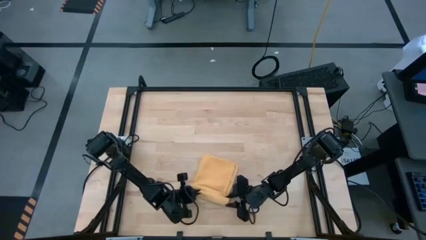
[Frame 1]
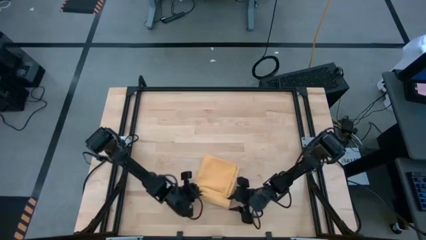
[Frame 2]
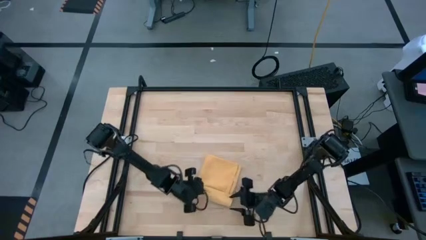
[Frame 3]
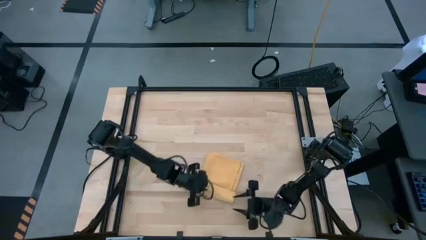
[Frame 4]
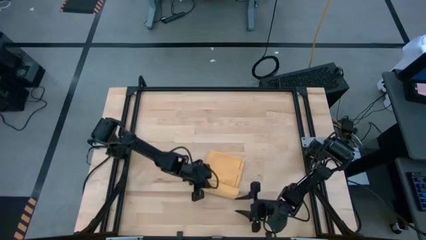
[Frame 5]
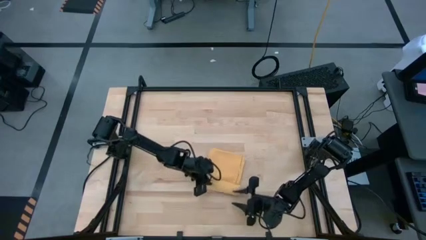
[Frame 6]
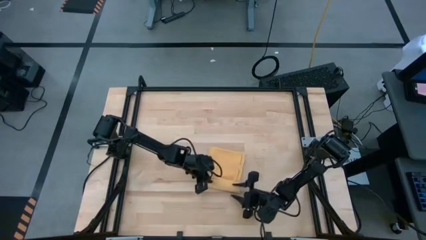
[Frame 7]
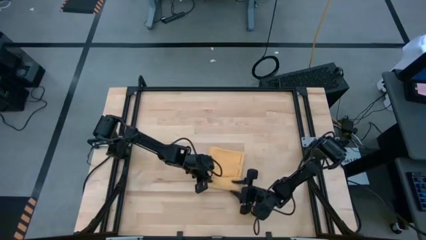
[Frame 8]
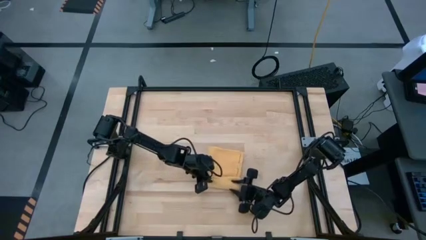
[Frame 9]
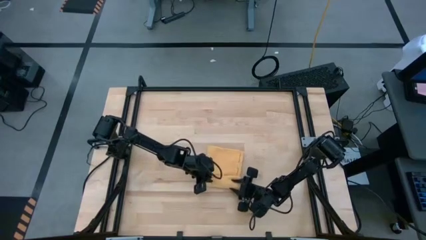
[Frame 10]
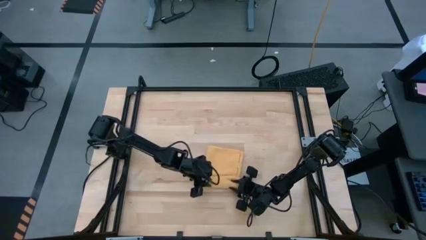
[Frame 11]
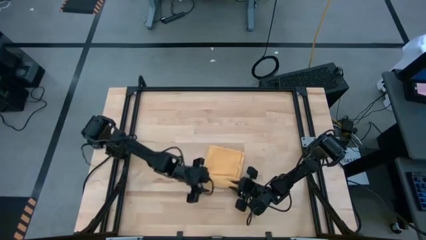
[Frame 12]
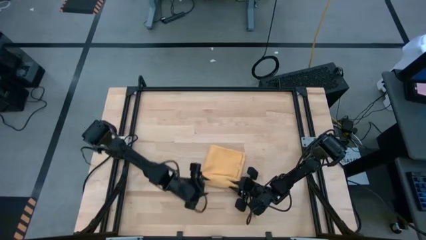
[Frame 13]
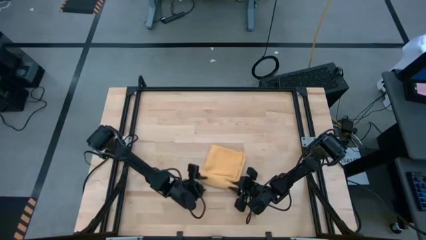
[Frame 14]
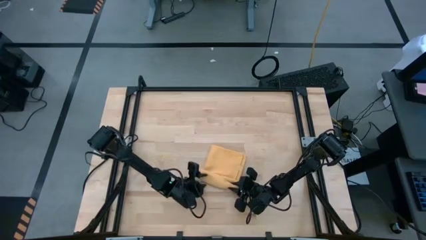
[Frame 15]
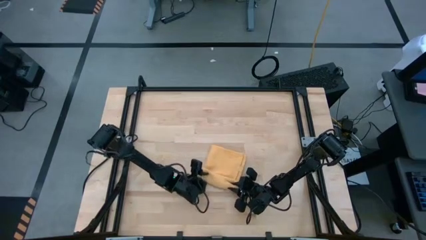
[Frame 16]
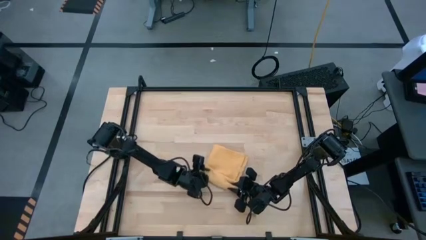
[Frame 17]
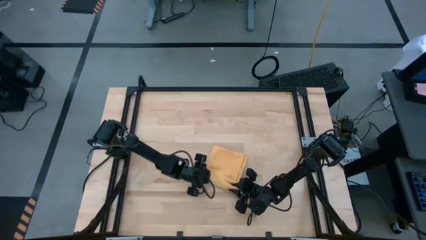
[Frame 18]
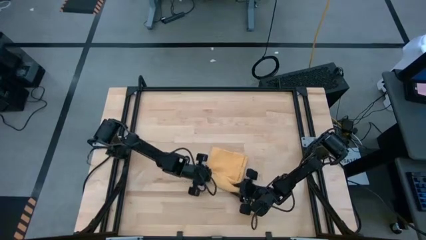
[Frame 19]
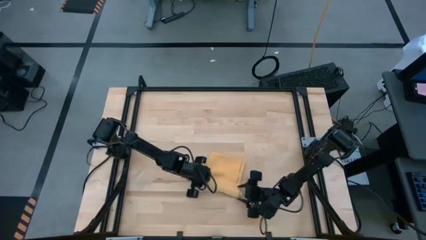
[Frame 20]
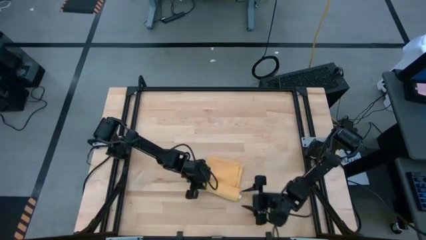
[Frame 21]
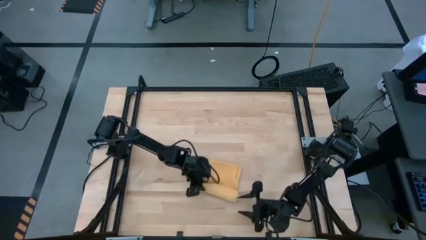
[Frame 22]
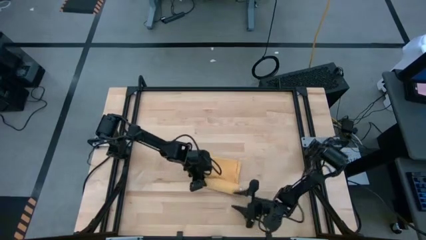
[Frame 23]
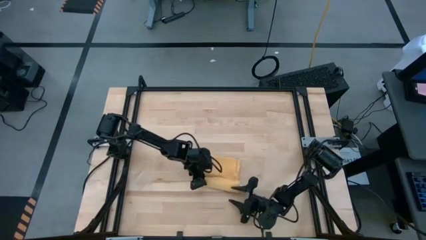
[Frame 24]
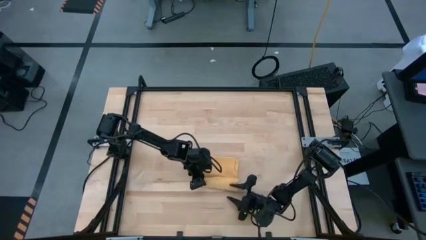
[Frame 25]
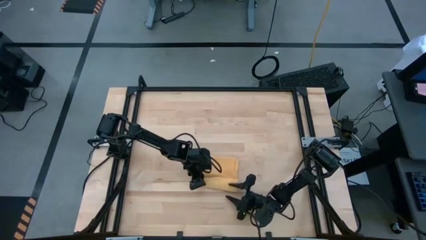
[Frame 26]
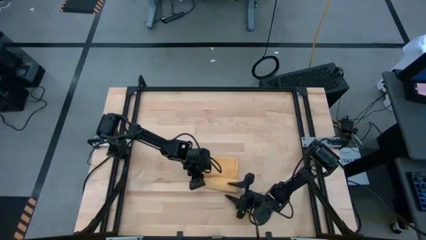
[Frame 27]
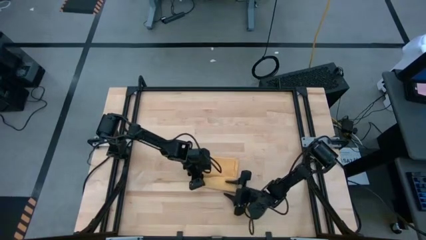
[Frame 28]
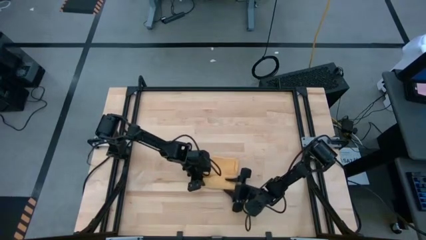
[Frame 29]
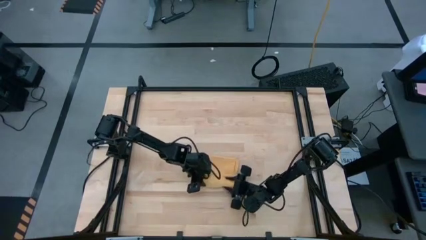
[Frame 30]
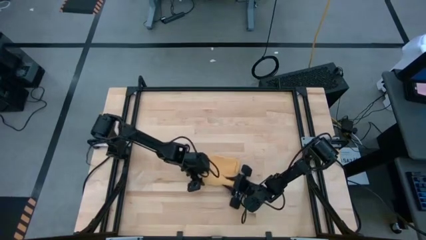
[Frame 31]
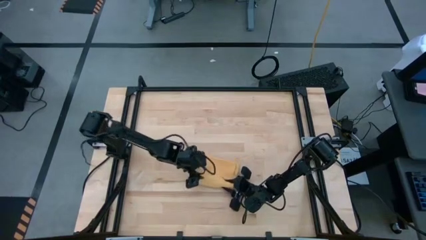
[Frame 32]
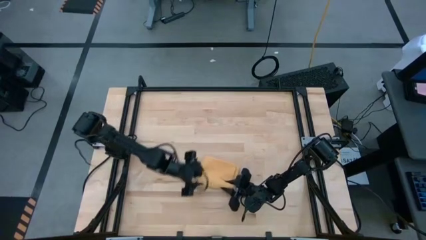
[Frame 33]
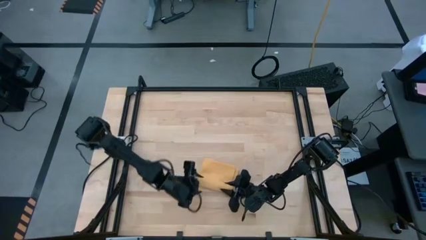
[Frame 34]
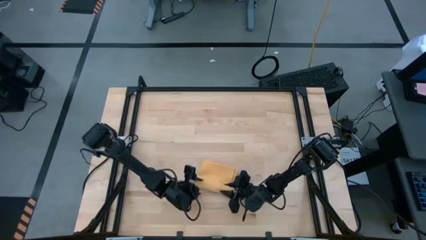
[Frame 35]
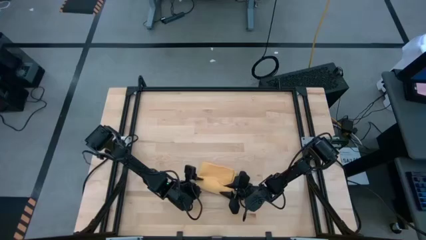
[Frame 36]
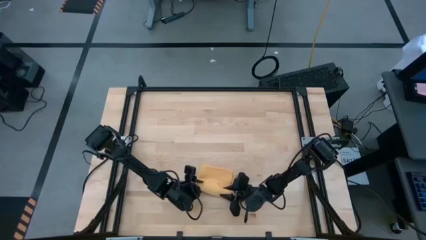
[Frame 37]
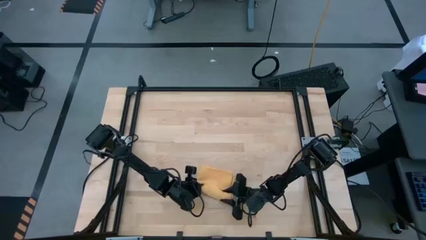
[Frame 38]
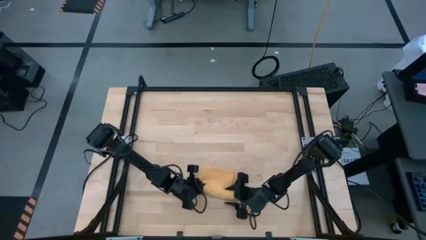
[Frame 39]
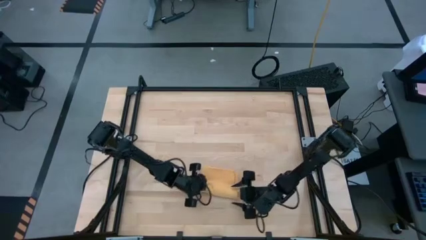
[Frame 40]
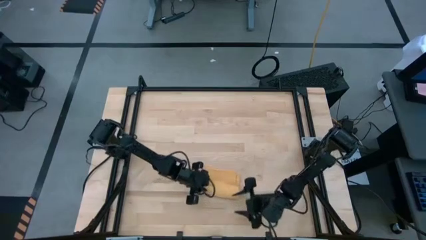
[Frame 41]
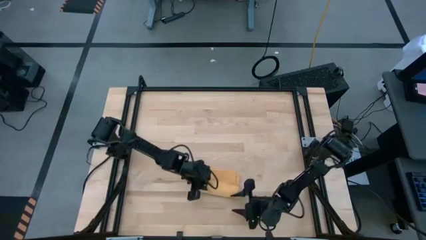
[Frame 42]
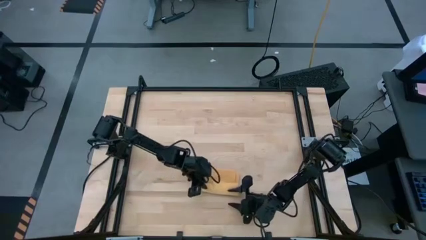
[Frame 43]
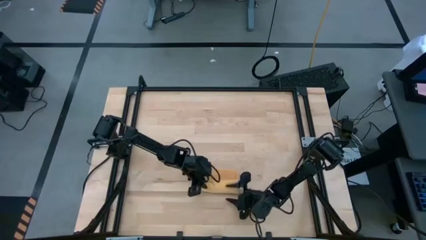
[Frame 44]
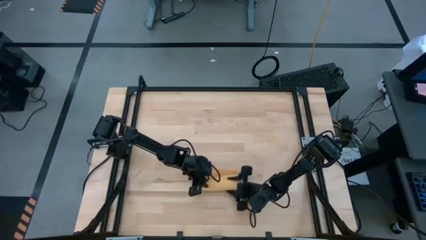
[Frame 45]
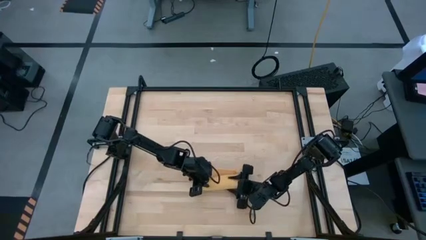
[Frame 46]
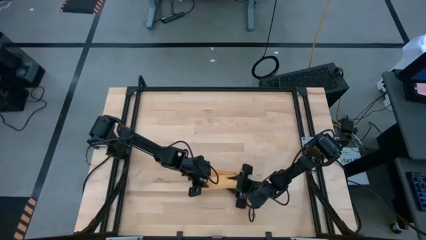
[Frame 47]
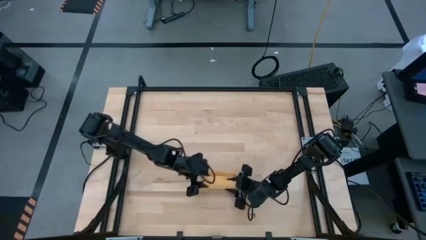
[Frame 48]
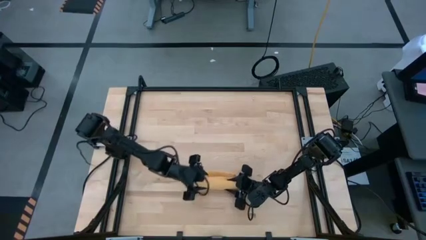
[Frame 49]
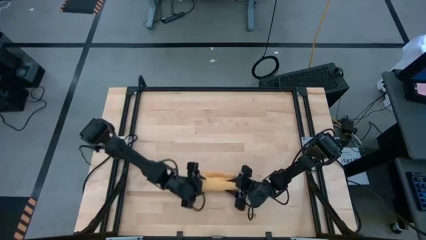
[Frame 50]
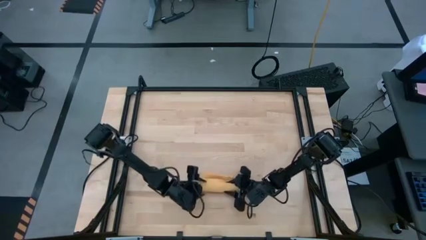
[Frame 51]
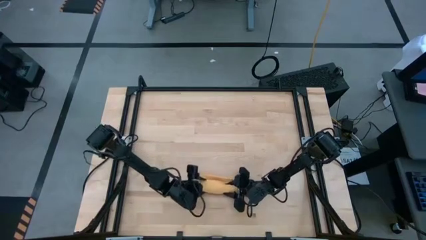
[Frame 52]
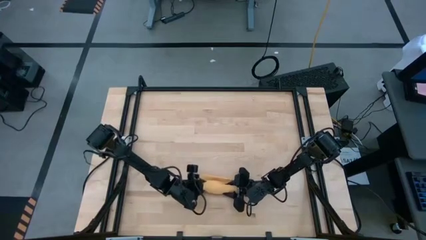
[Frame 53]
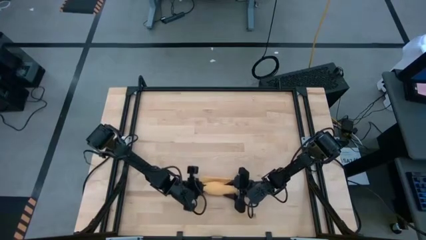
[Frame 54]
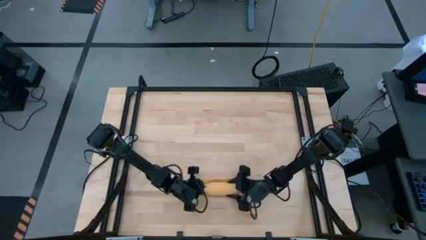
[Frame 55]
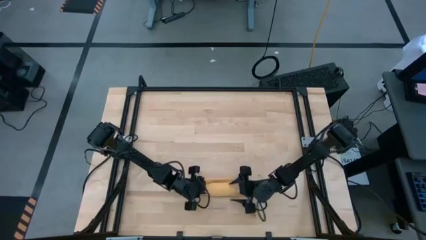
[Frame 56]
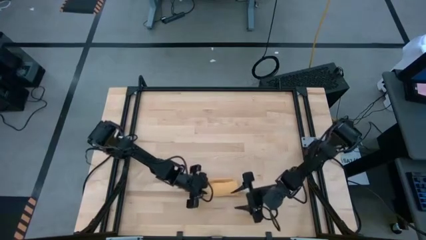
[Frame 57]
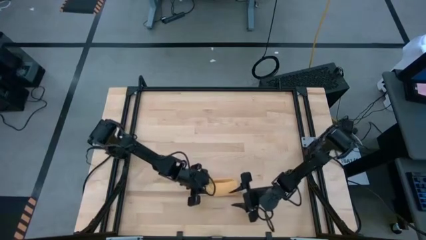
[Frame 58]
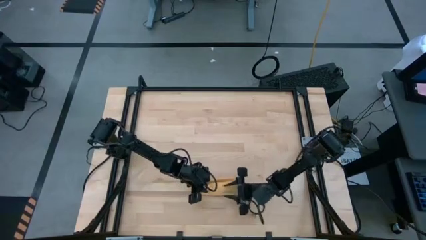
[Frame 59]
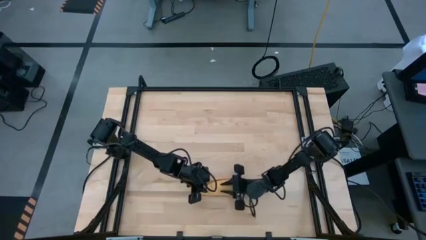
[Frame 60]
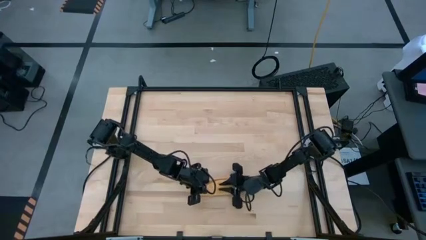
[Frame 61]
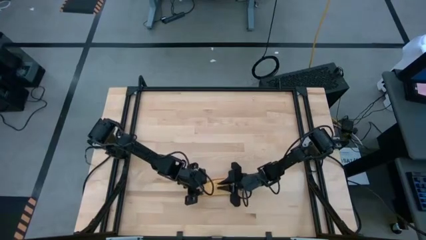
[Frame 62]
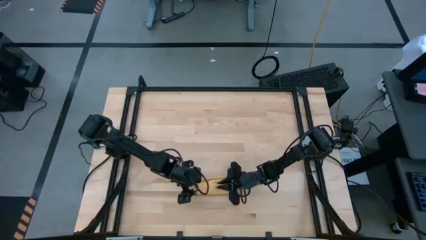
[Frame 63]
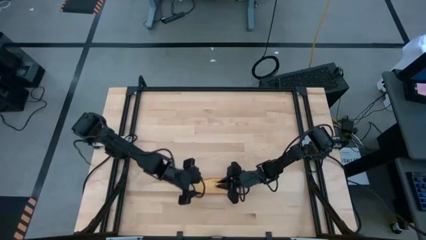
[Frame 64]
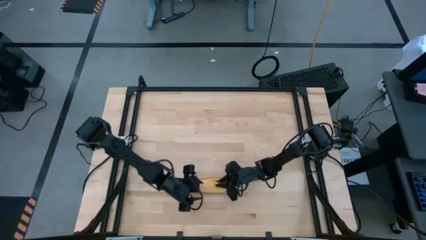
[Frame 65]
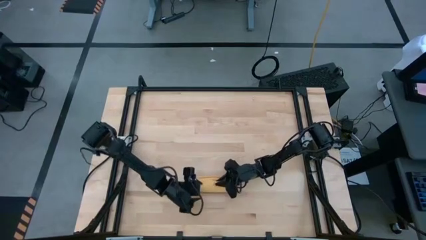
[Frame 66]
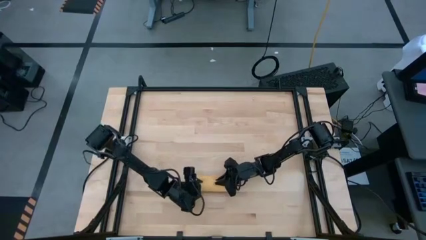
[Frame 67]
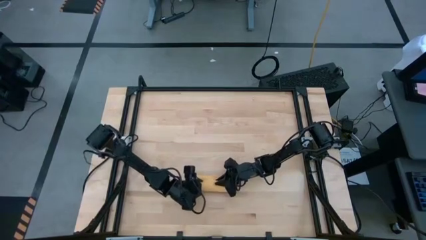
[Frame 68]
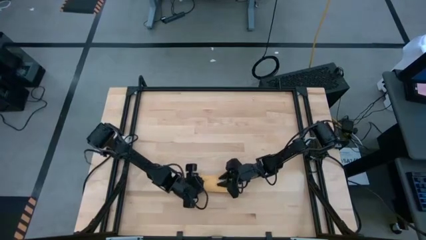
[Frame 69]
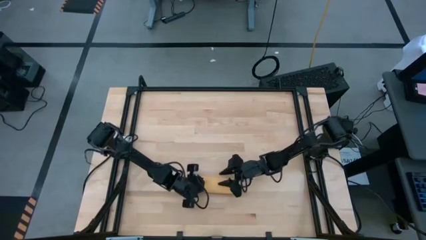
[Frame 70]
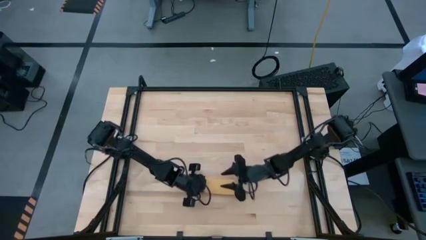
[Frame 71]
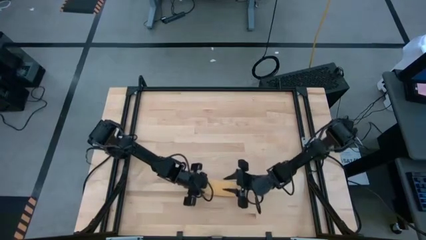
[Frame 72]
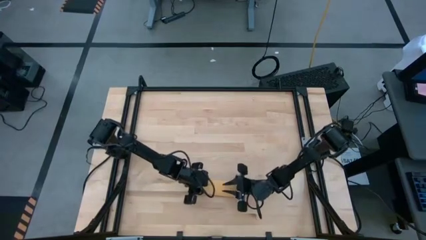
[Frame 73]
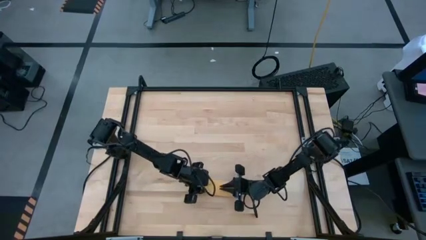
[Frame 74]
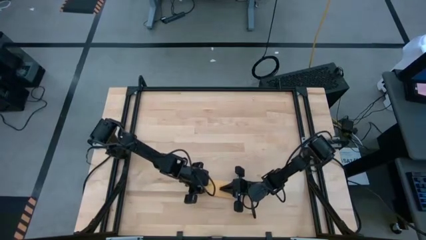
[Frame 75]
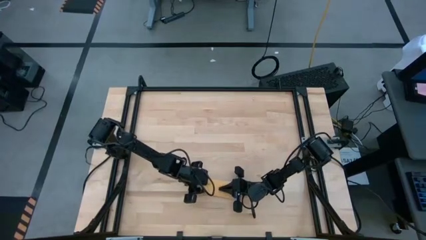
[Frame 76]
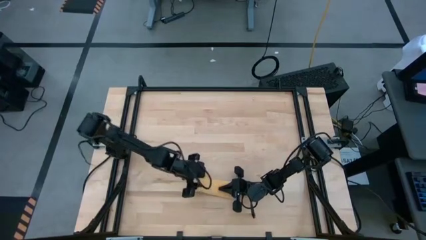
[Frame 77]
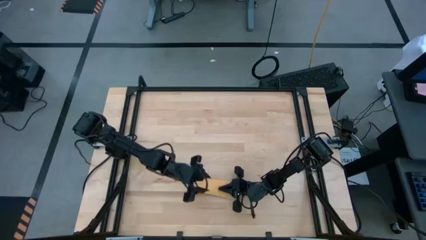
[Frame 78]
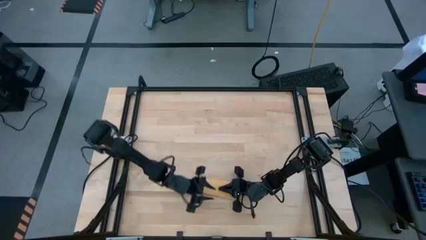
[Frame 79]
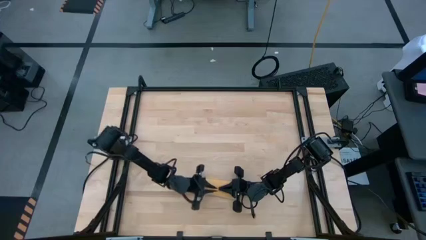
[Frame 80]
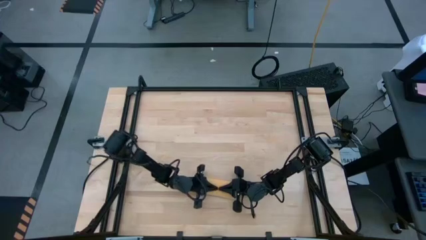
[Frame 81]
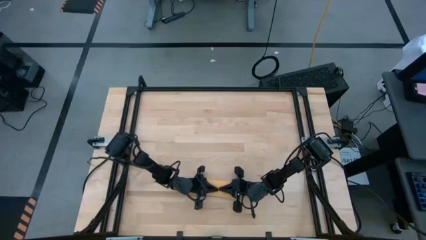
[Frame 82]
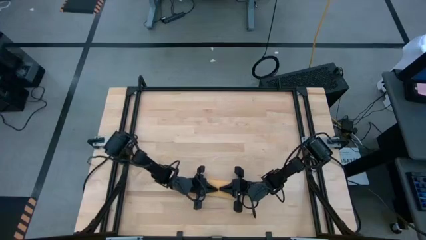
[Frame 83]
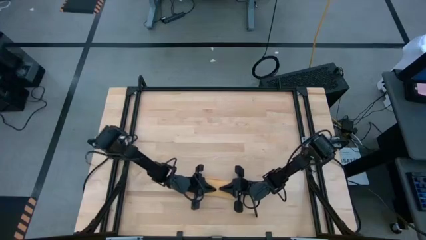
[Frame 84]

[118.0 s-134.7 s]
Task: Roll towel
Roll the yellow towel
